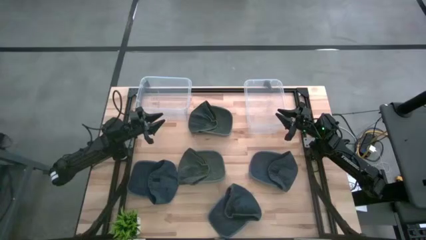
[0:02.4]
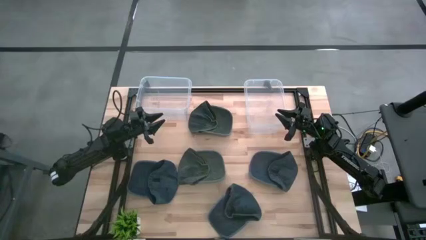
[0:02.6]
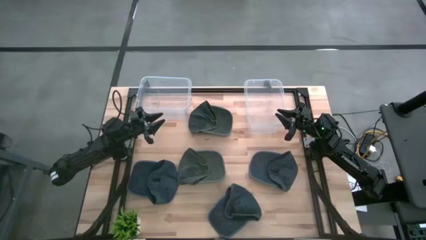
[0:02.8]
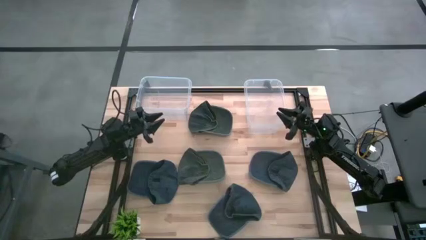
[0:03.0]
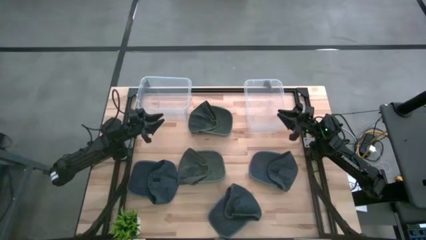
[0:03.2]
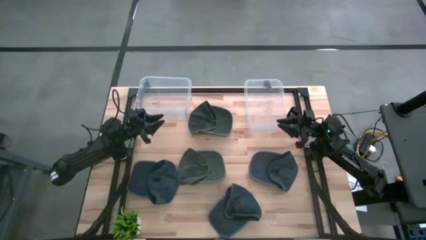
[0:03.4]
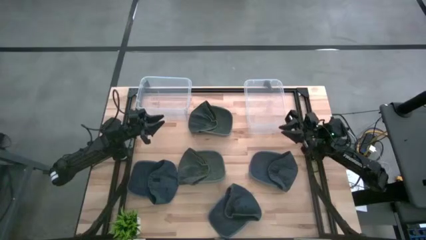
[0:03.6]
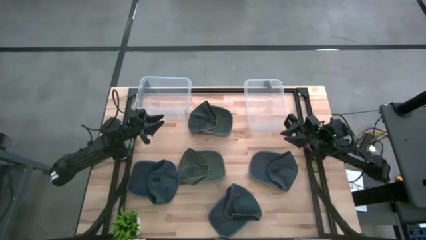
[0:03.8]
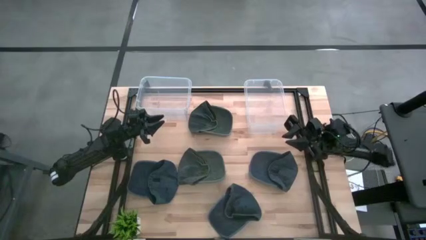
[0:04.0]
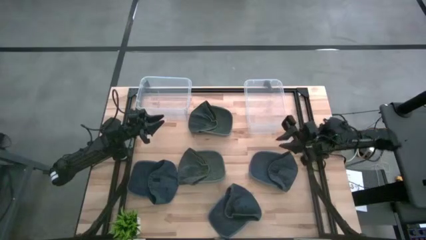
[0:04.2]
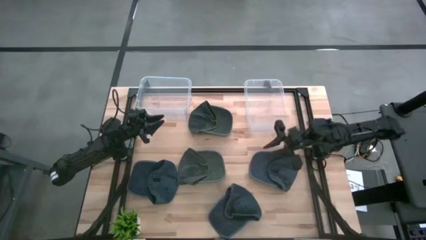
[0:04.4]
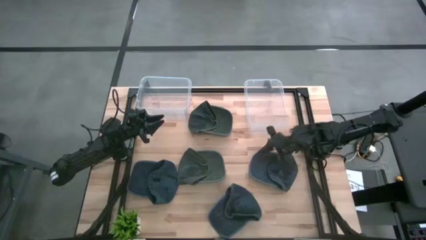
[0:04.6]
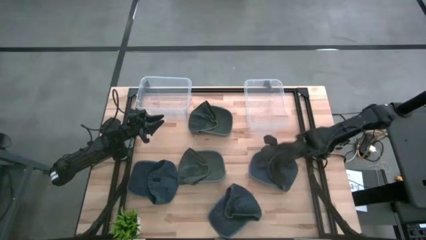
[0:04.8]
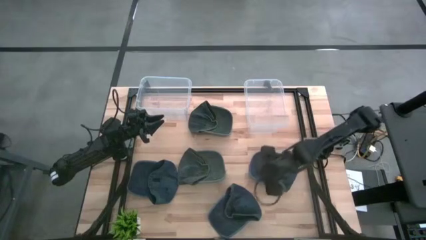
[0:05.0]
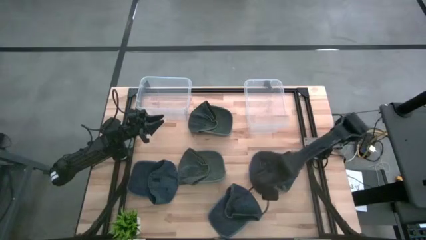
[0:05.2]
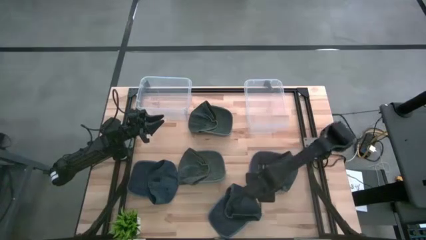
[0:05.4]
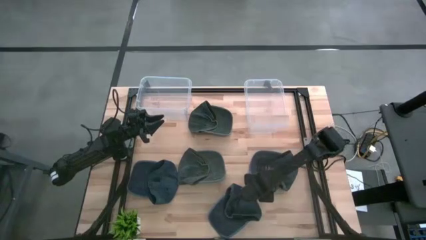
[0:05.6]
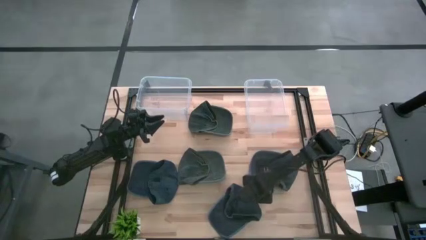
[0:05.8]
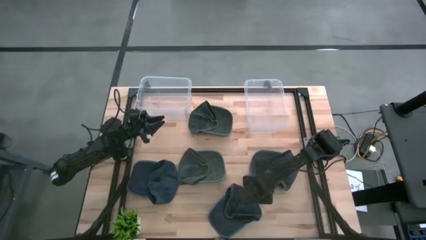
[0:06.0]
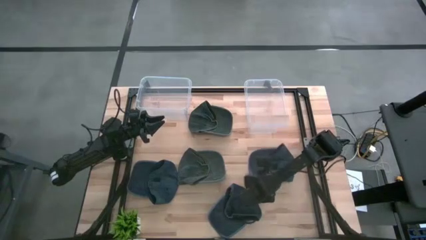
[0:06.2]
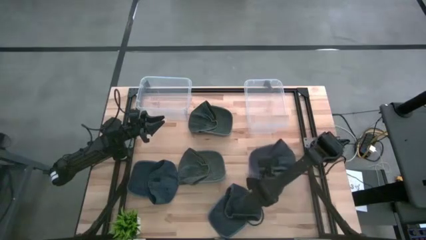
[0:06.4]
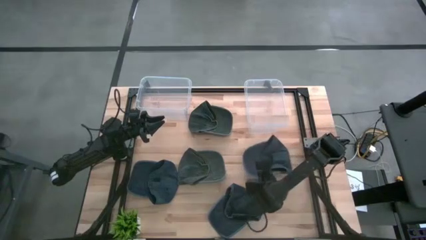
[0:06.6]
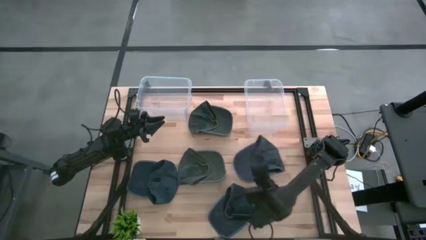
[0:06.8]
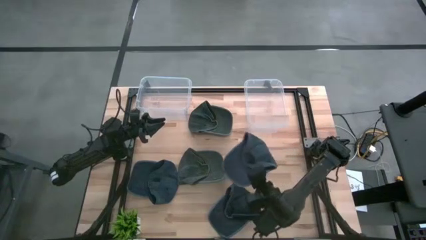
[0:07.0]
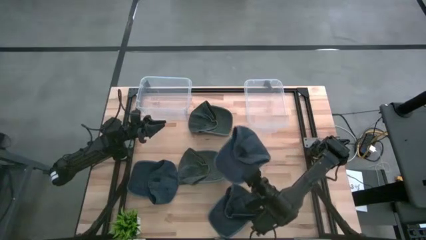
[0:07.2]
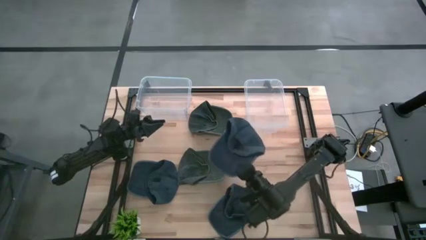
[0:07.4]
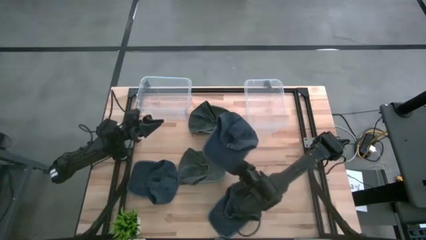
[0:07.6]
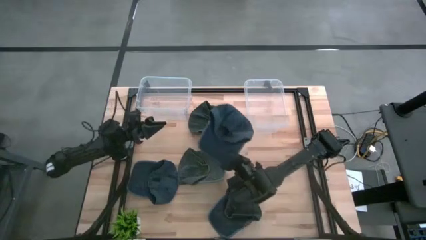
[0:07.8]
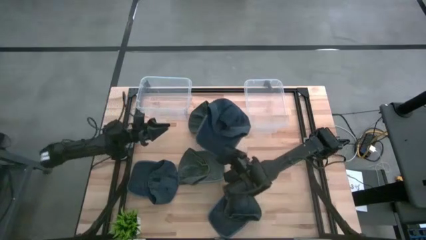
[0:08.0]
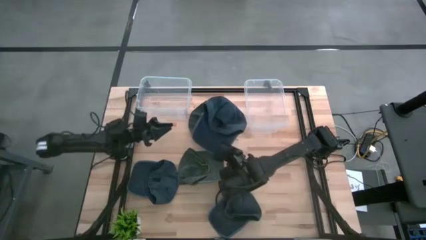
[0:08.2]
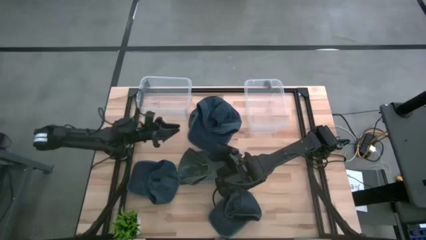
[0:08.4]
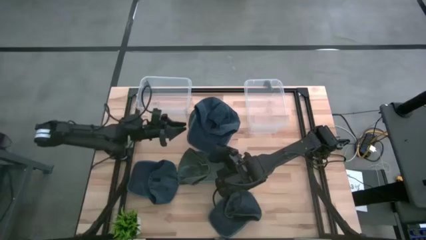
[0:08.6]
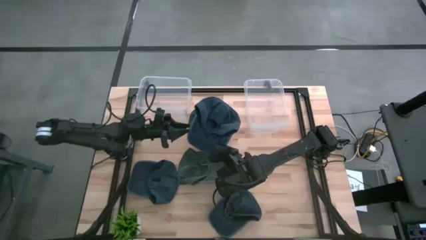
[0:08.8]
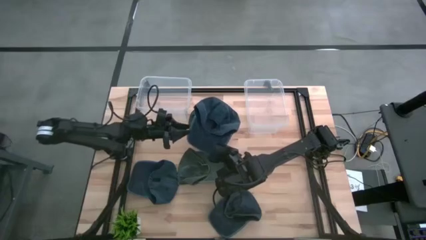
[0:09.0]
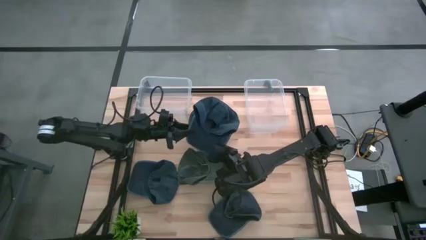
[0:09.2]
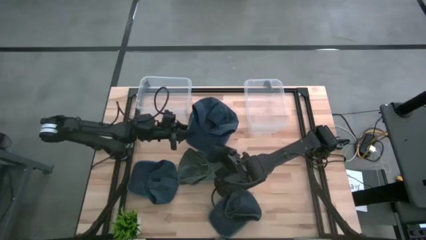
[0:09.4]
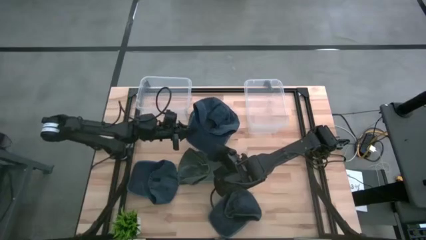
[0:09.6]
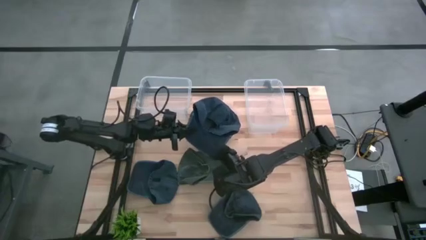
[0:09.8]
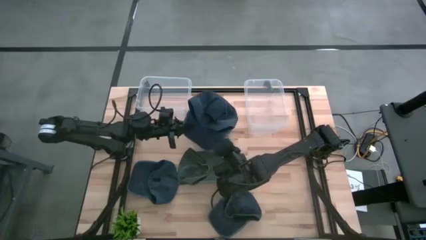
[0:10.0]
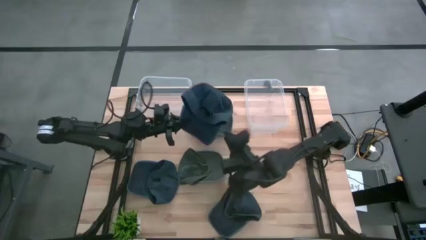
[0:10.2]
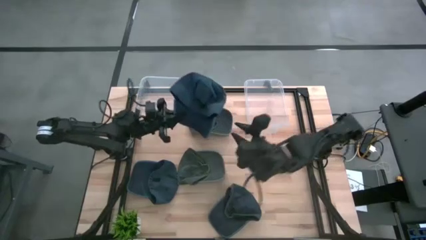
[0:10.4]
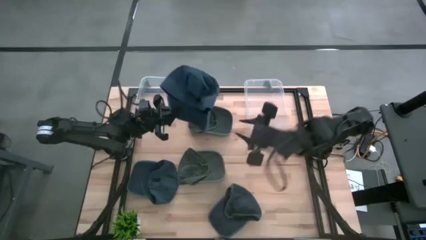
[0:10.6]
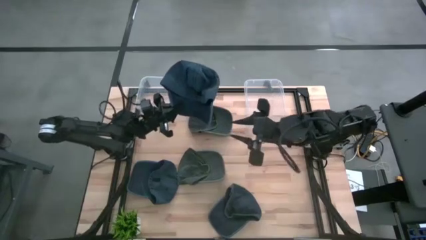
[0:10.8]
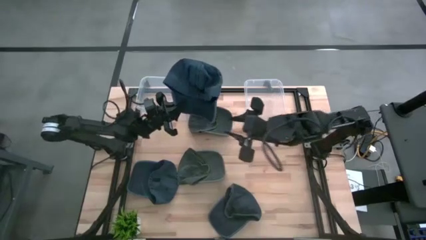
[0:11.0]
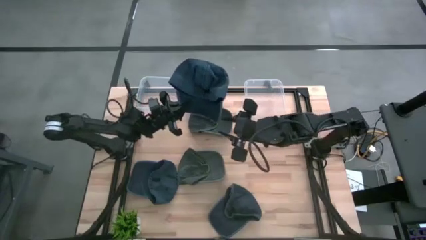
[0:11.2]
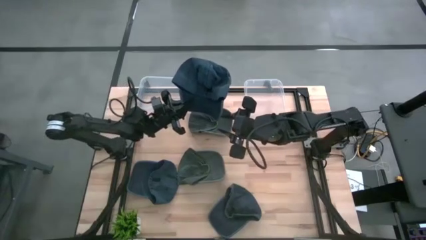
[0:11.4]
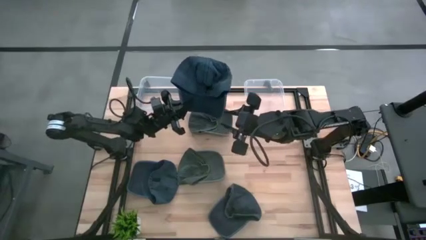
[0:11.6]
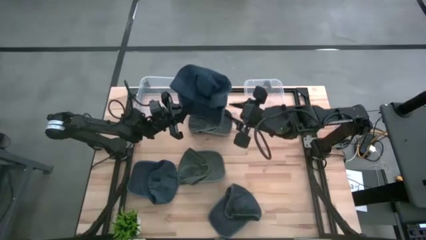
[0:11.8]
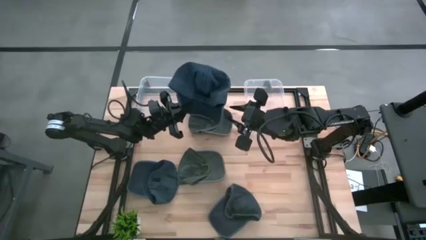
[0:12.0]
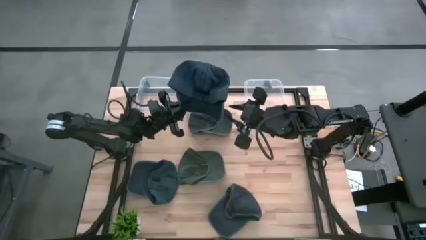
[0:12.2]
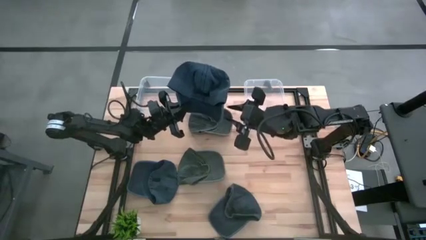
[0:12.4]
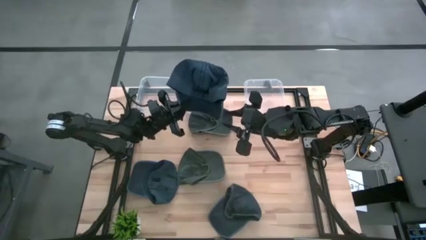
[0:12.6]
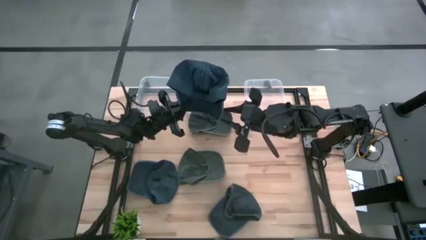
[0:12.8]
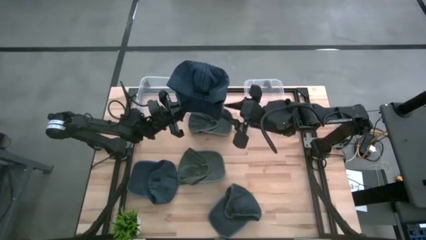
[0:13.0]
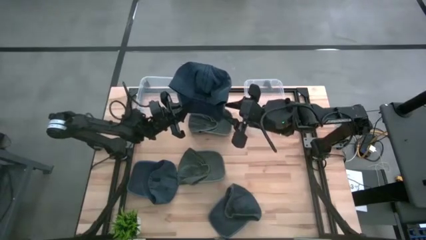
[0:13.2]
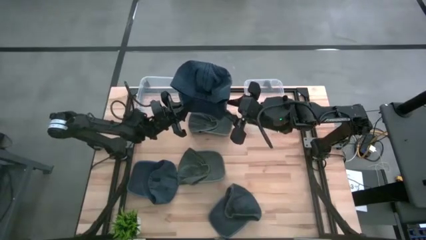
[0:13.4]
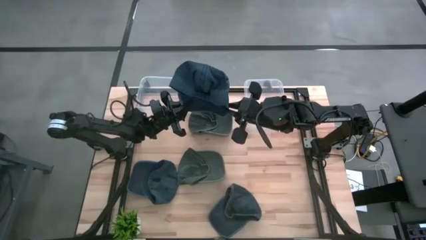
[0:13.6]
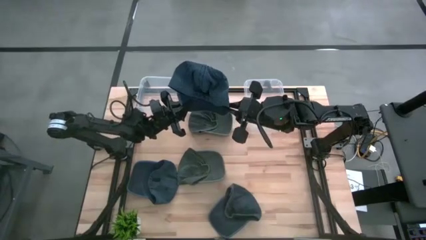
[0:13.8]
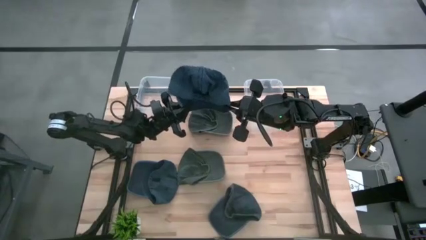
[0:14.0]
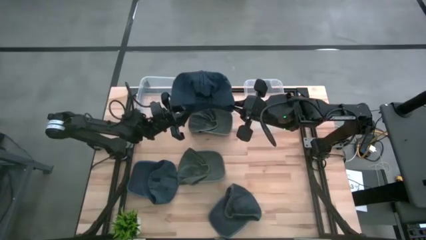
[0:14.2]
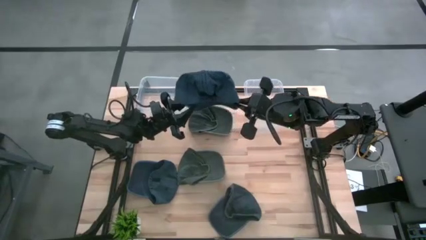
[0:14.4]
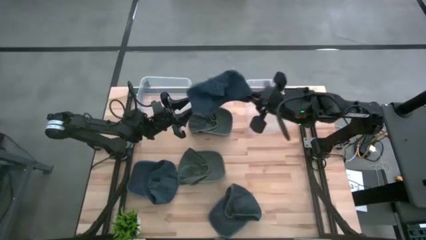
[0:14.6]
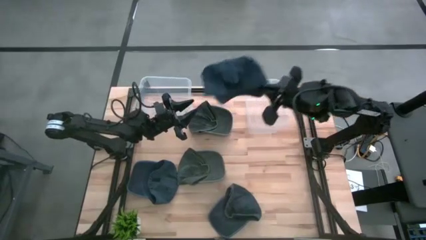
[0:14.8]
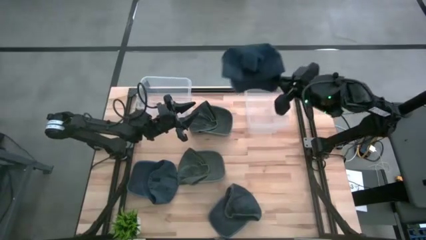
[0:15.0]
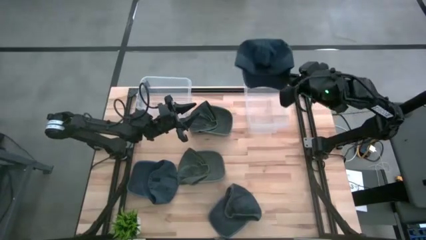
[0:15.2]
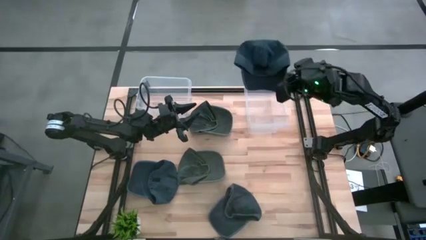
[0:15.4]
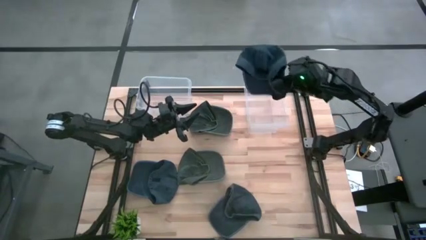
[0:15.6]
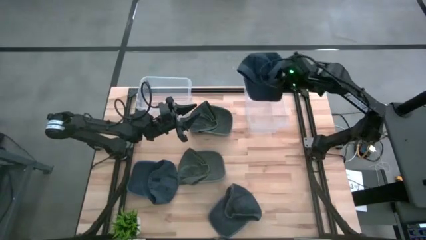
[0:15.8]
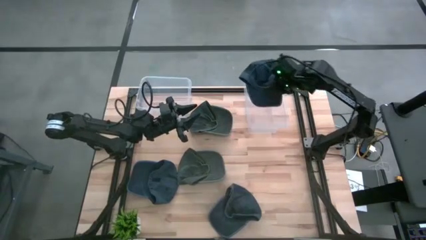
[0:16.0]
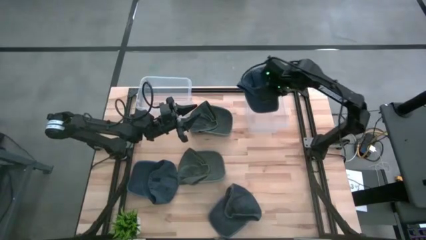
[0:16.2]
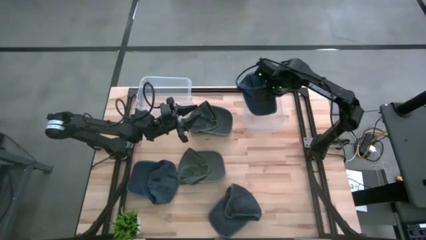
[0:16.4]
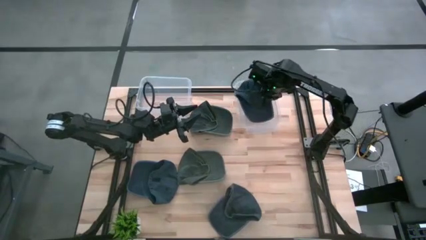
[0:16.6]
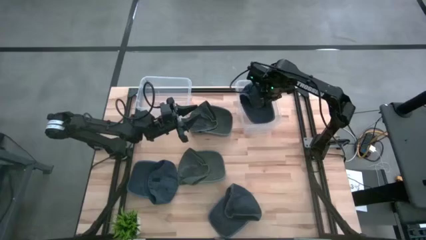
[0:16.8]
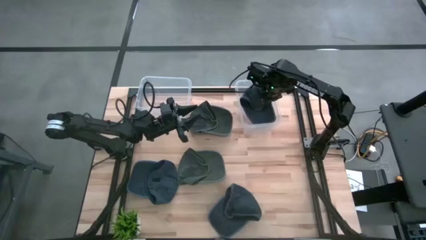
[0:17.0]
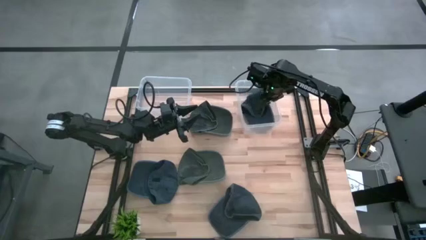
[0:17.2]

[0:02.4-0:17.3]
Task: Pick & Place hat
Put the top right blue cap into the right transparent bin
